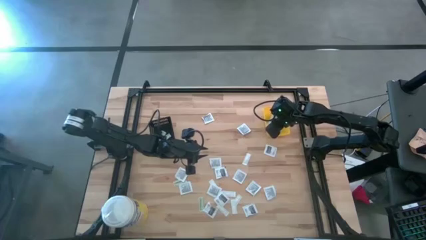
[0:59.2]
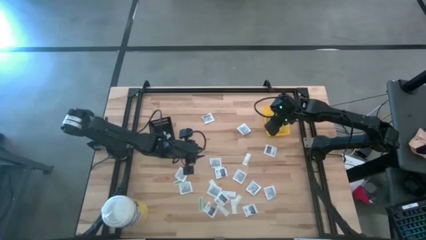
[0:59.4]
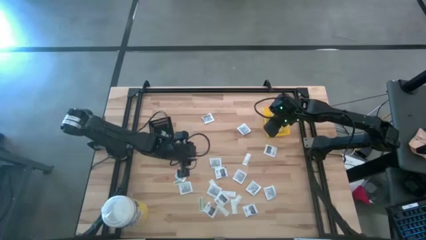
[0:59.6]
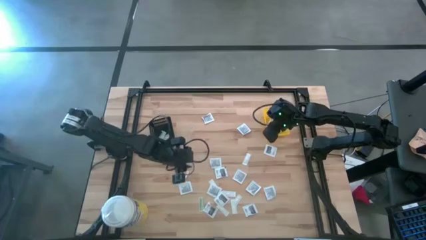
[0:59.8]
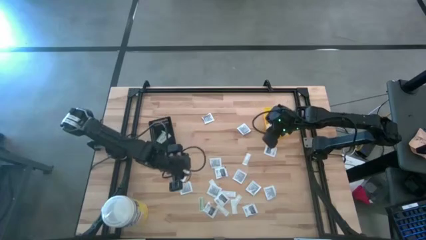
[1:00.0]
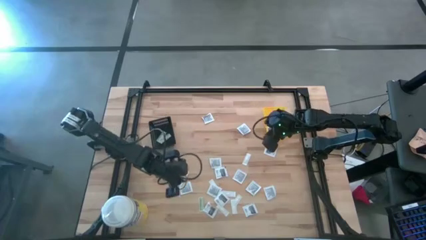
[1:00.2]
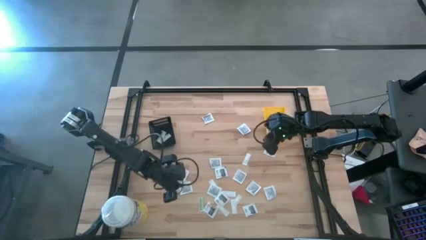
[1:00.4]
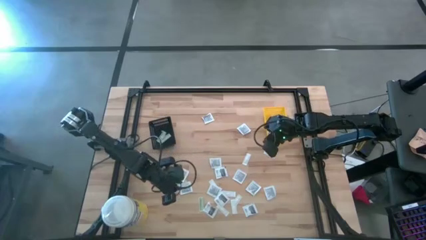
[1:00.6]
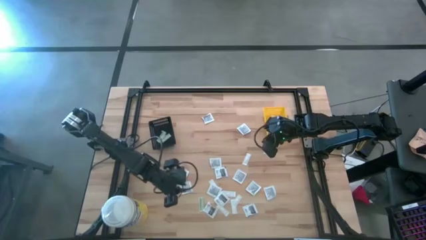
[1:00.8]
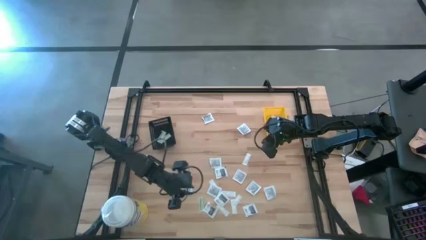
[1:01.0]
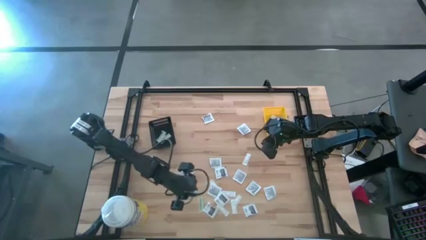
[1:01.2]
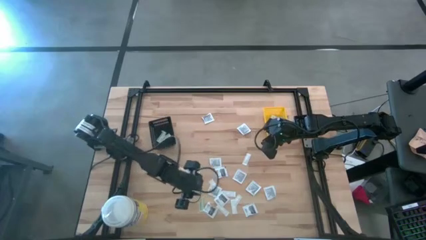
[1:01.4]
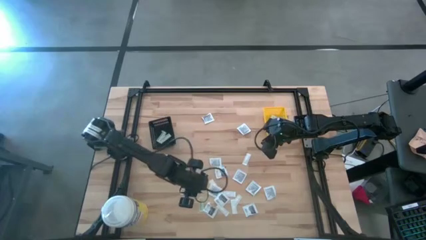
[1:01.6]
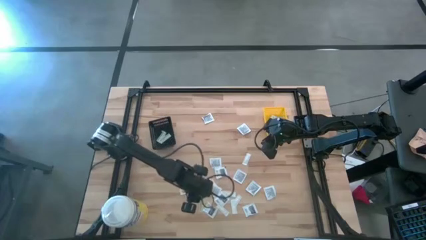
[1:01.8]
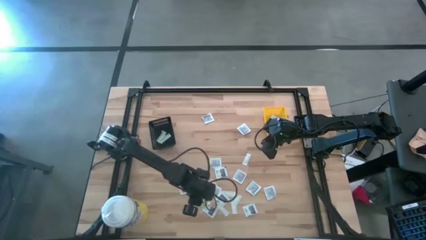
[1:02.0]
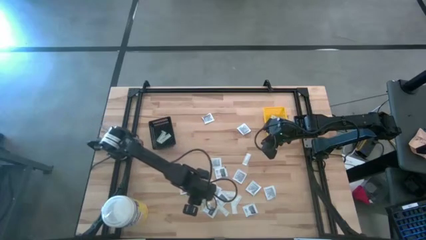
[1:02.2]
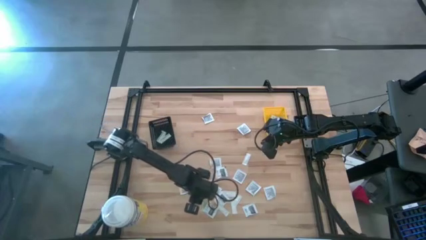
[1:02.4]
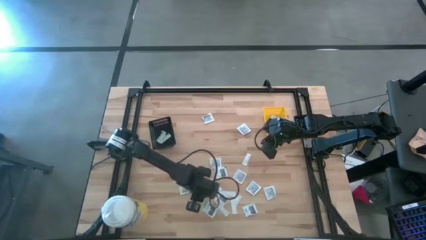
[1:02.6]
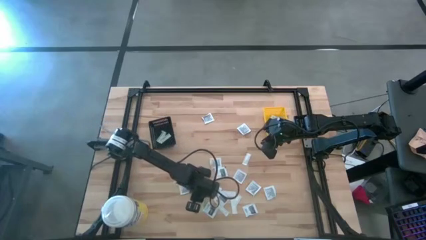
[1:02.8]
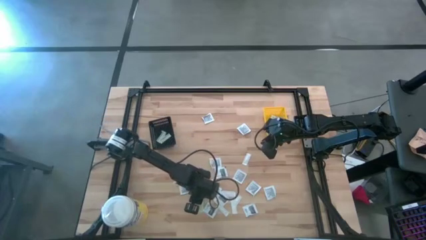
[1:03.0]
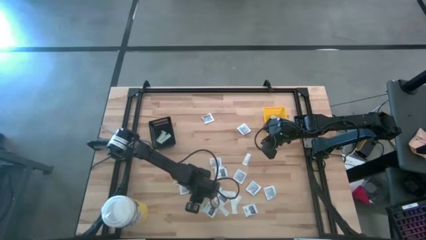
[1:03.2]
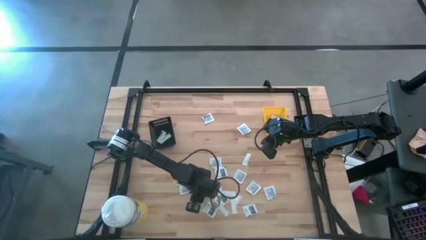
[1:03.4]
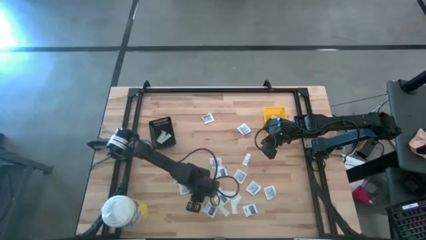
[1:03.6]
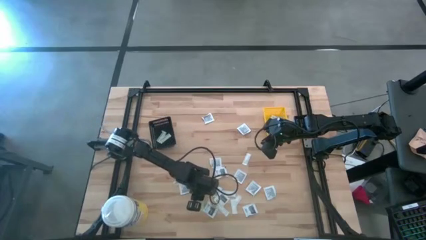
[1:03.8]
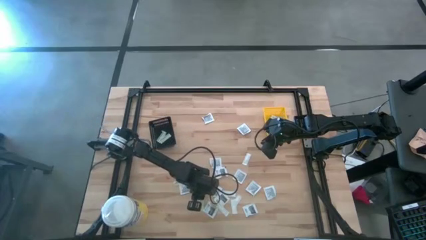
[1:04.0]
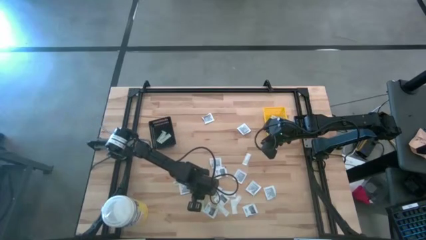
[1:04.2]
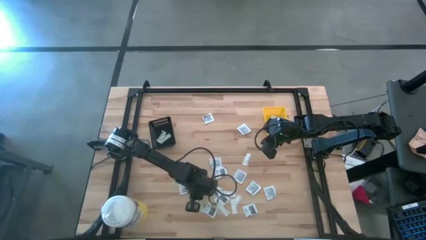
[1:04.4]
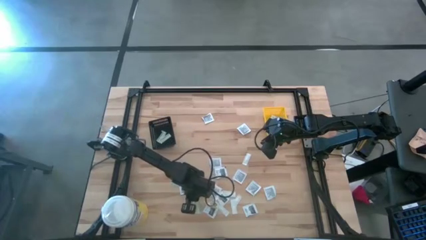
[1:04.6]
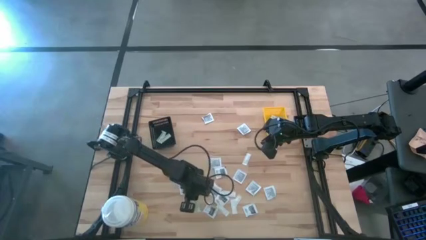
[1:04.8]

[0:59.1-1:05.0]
Task: Pick & Place First Aid Supplies
Put the green bandage into the black bin

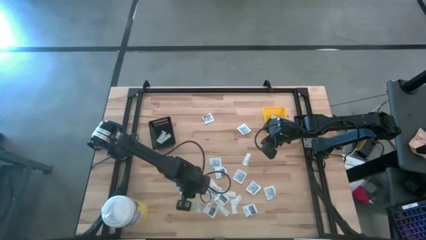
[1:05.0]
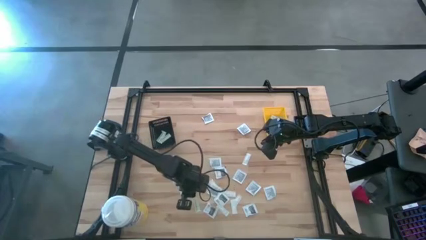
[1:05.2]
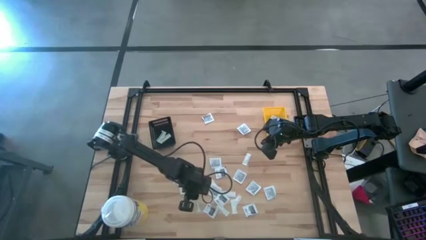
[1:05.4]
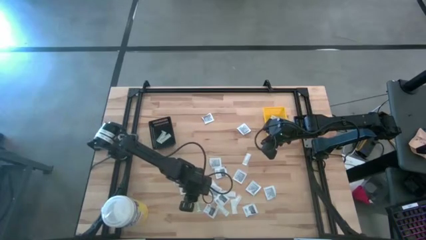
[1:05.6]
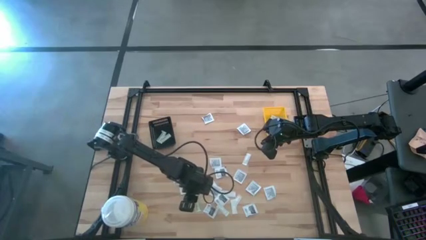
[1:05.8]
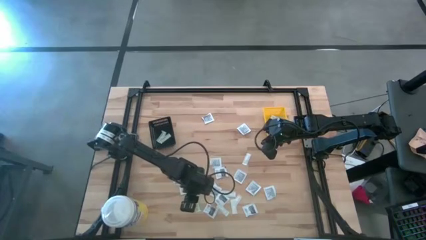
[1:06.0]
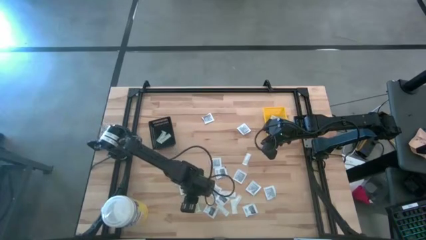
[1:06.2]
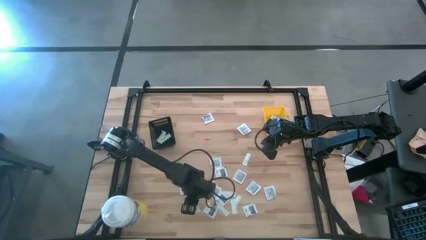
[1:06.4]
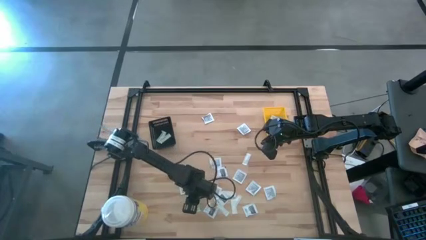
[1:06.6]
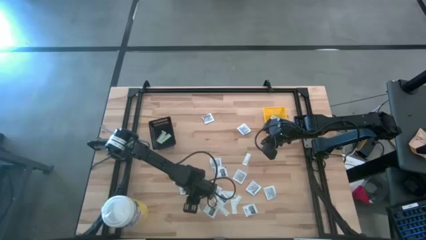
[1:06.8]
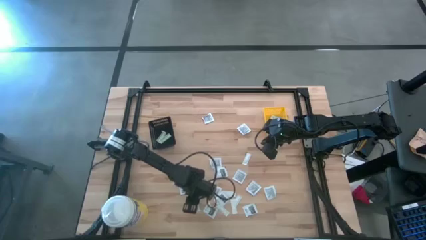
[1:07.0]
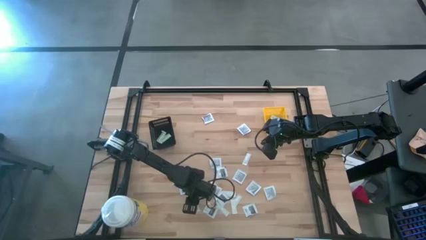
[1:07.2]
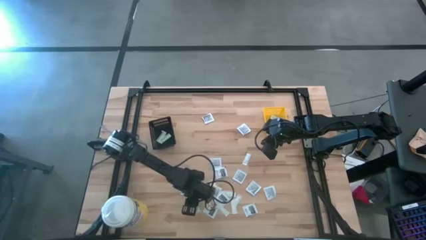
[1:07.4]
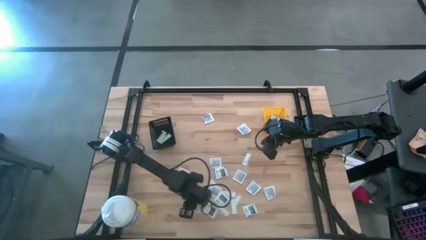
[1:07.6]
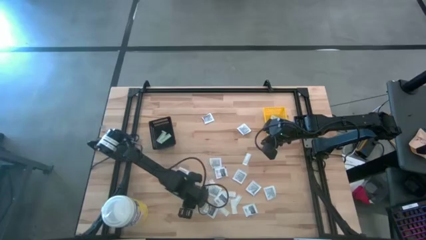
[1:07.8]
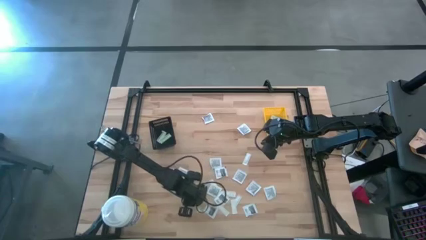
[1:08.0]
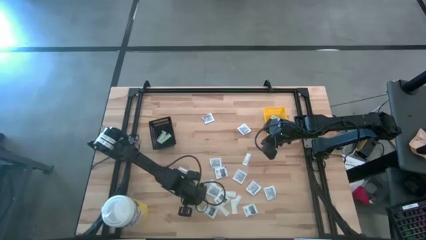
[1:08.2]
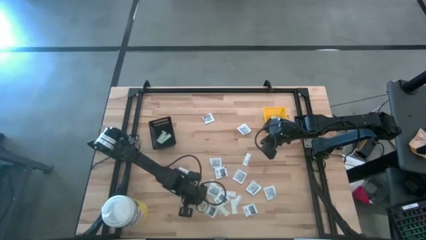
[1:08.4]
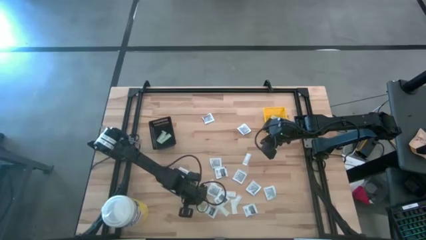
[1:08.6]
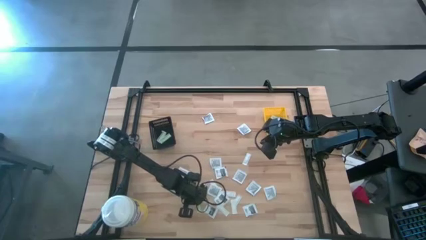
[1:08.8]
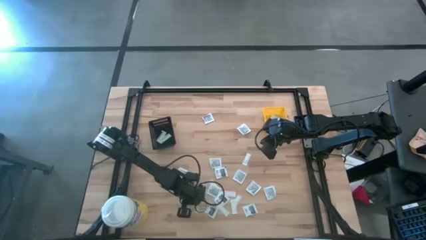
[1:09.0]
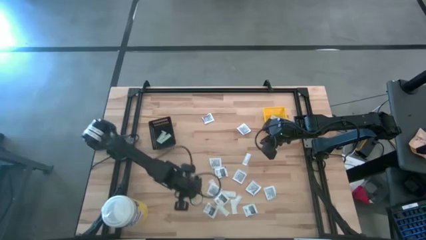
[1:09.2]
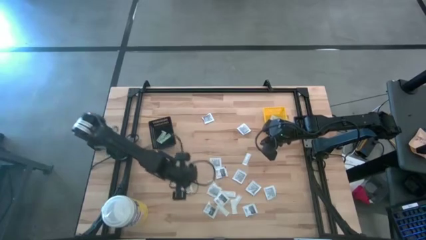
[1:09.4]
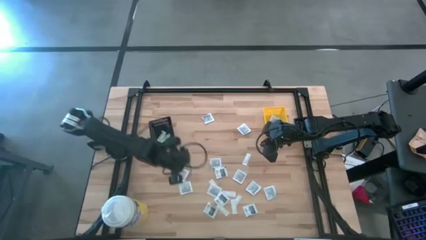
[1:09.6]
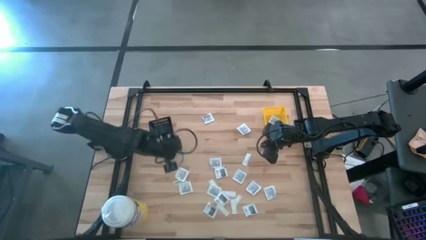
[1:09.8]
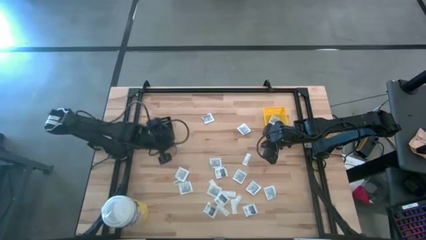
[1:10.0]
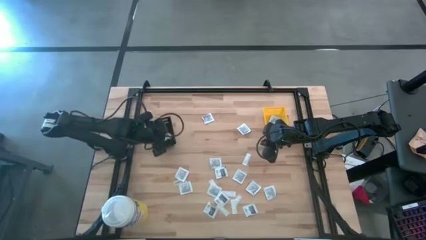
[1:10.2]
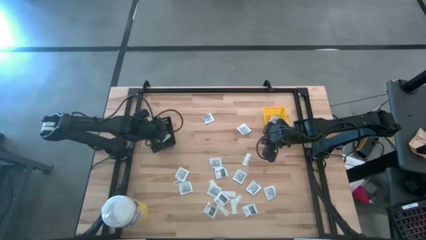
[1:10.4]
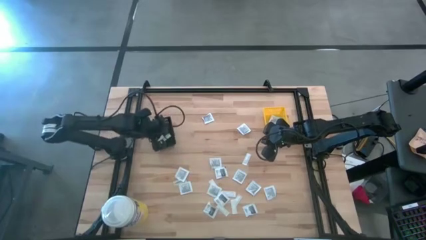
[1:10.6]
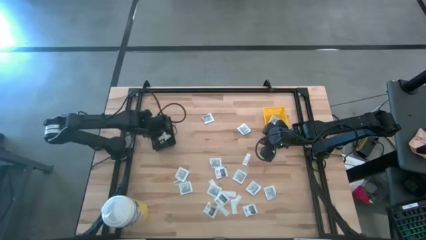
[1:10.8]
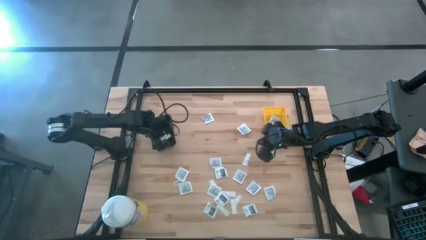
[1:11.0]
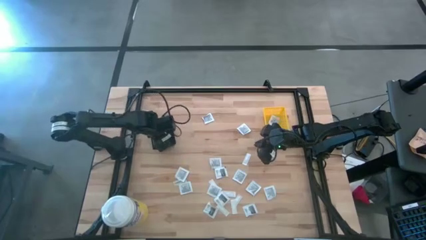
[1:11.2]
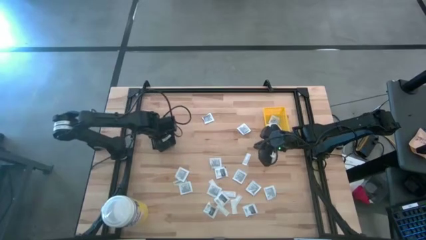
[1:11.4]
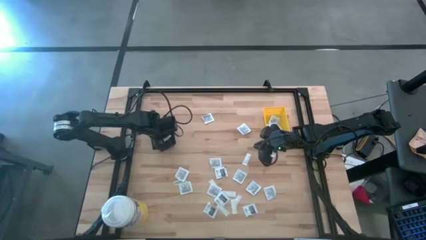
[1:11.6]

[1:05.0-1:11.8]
Put the green bandage into the black bin
